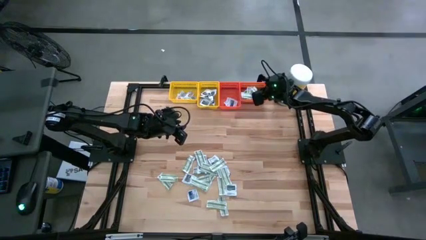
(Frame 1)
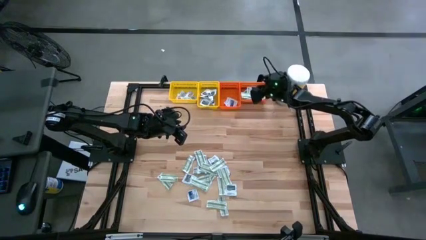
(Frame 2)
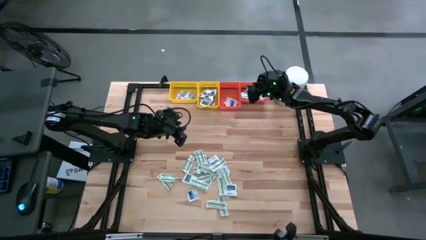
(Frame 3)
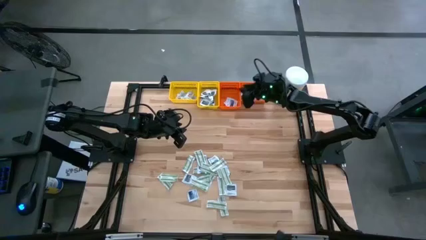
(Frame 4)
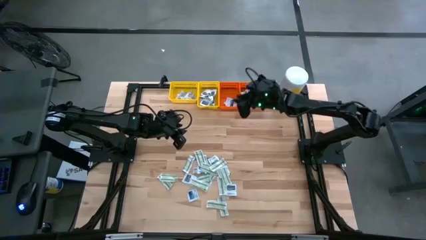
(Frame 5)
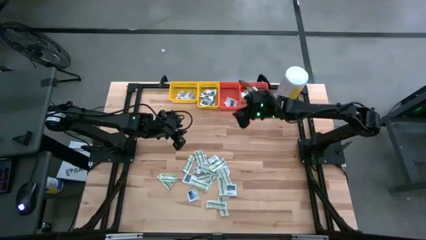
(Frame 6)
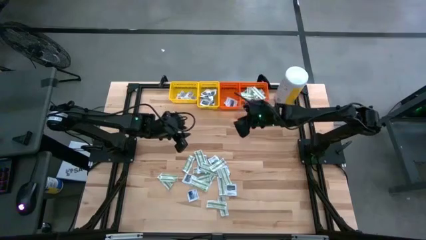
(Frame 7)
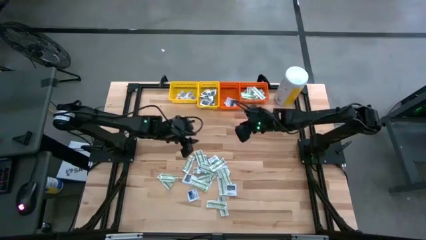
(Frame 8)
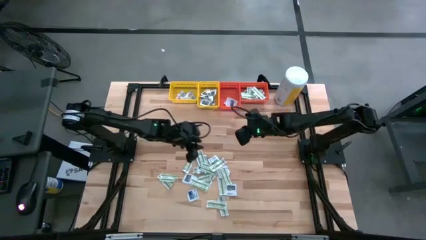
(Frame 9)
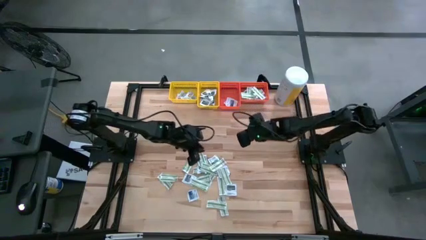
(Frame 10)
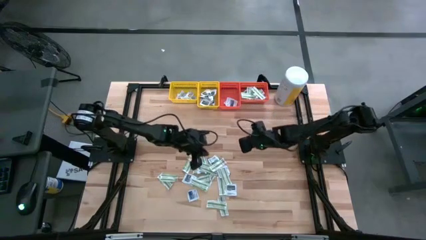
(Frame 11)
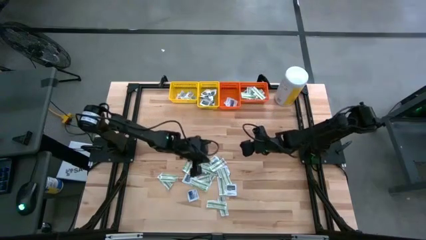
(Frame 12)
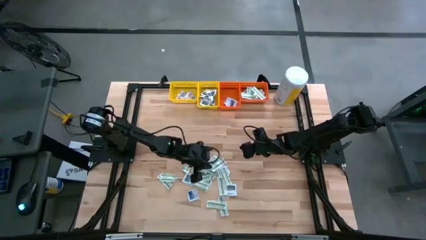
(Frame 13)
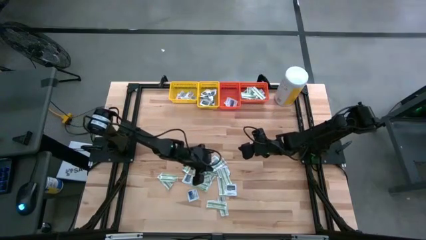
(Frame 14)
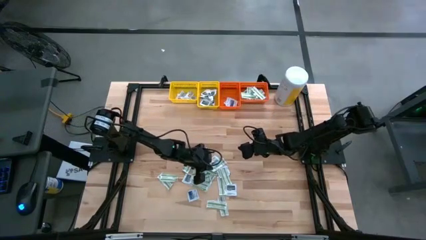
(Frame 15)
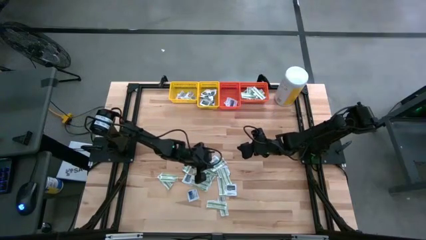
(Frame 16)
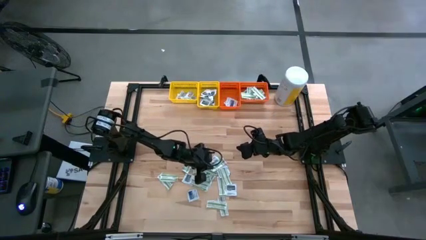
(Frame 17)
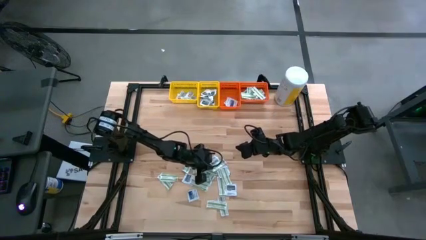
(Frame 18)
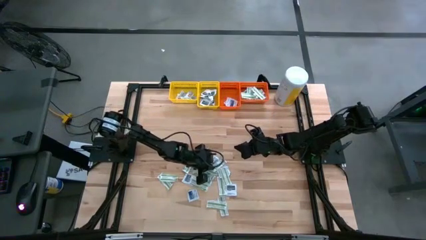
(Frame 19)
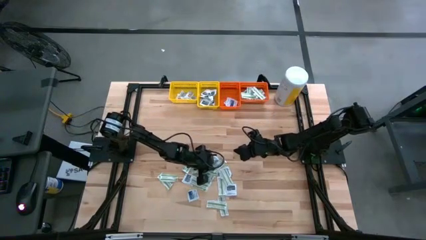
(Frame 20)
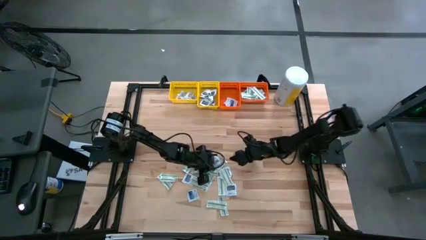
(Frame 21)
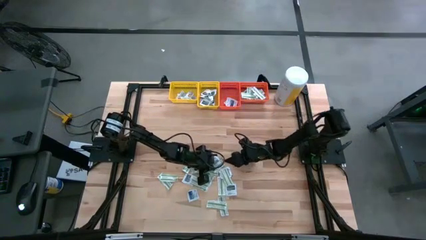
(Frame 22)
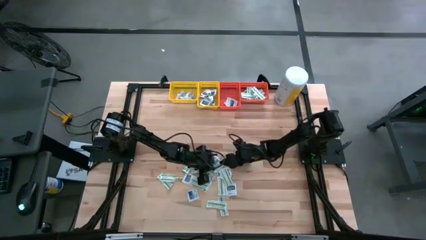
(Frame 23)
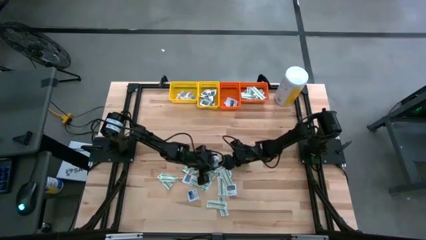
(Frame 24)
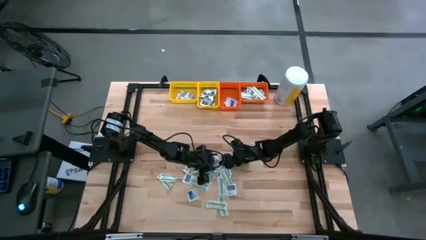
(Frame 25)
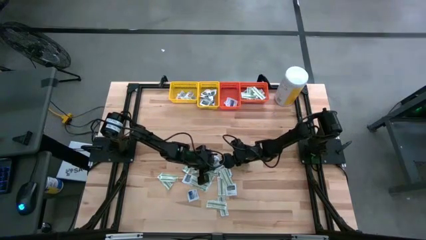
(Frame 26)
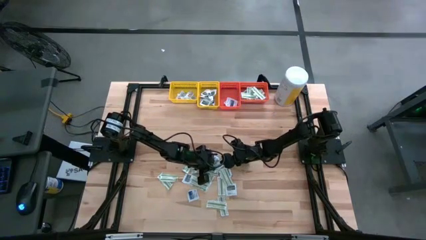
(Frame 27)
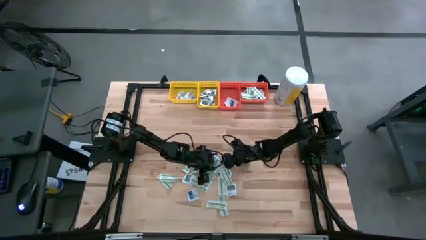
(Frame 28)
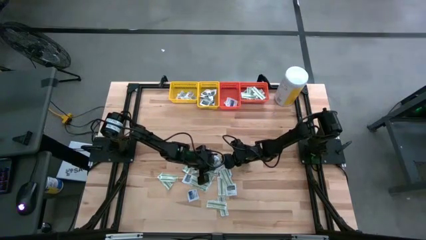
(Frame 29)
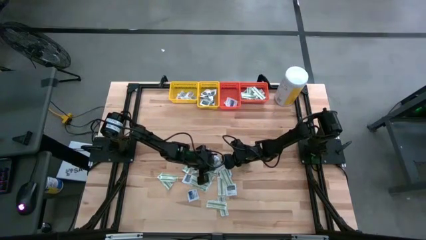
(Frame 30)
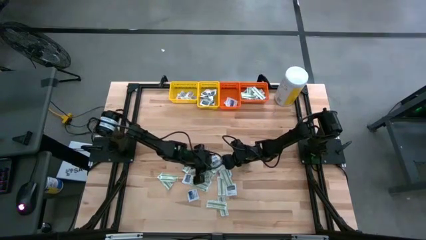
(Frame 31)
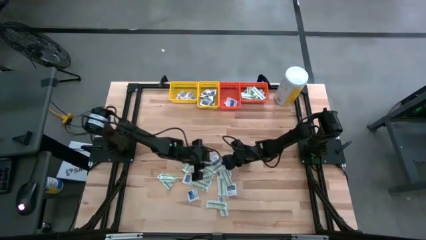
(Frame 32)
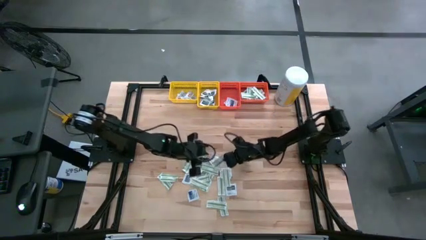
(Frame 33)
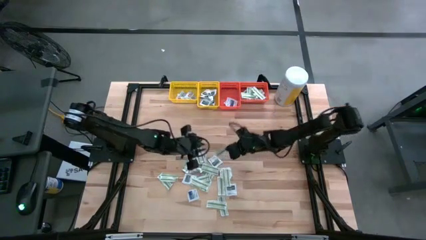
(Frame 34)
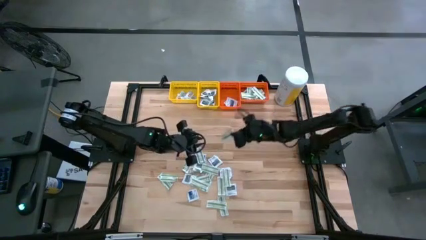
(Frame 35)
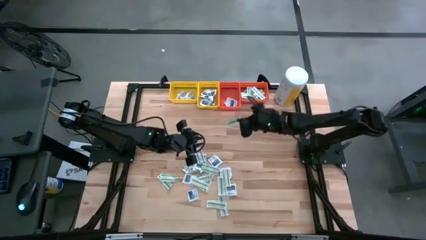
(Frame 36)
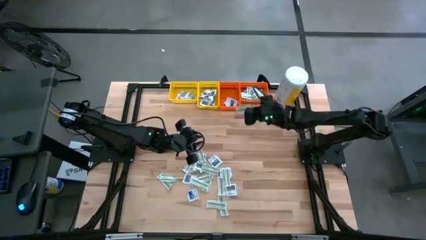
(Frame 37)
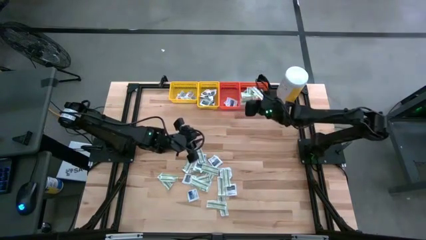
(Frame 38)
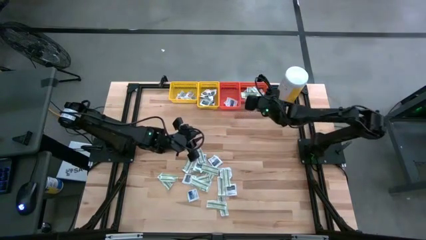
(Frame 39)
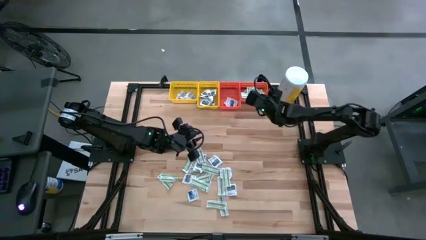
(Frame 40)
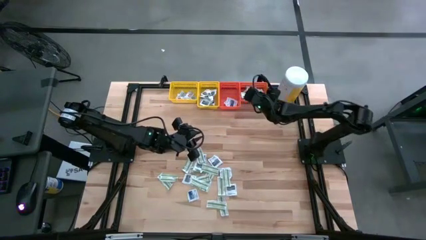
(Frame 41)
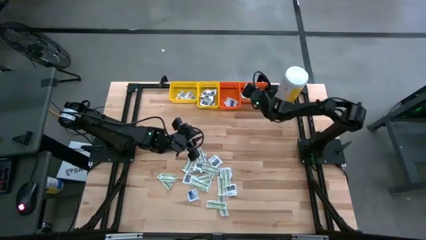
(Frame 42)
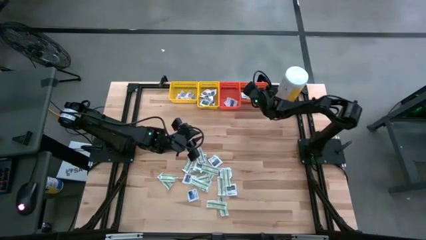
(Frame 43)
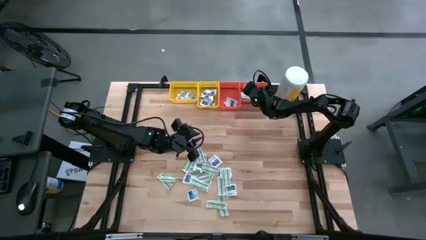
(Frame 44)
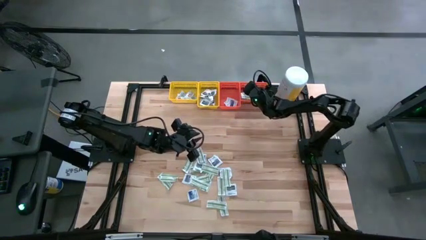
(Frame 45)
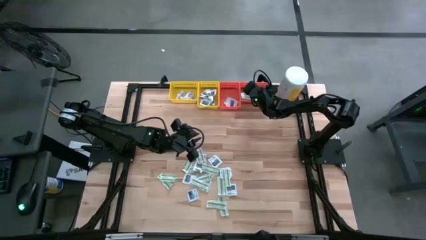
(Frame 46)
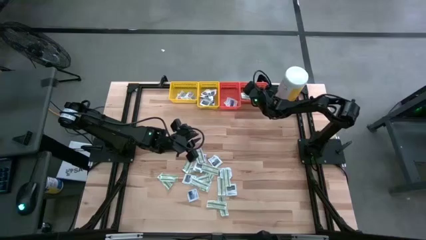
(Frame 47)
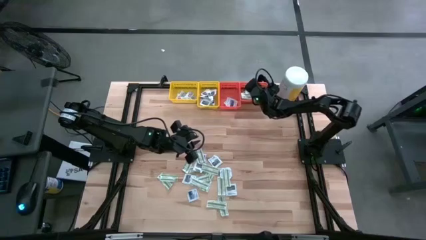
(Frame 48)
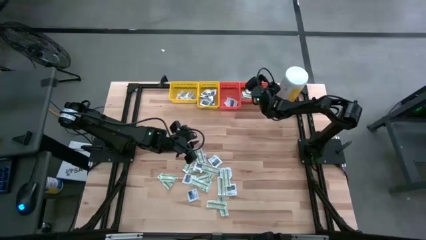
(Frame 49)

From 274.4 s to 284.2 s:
Task: Pick & Place First Aid Supplies
Put the green pad into the right orange bin

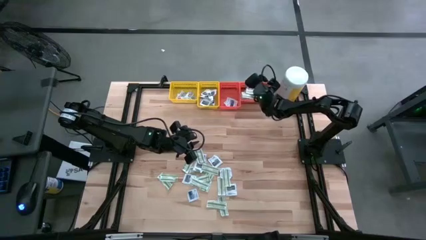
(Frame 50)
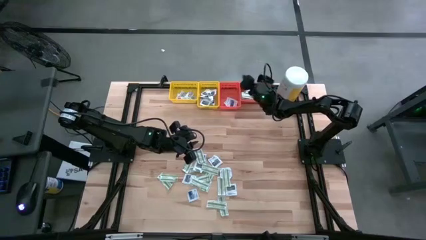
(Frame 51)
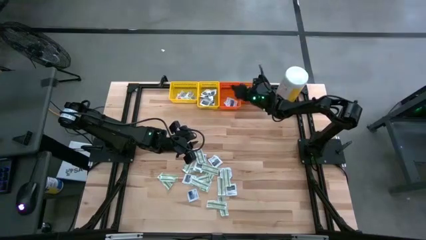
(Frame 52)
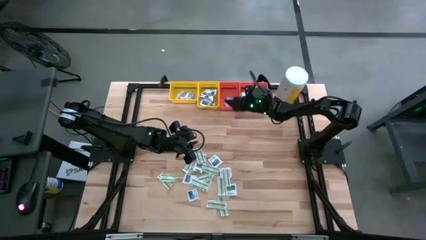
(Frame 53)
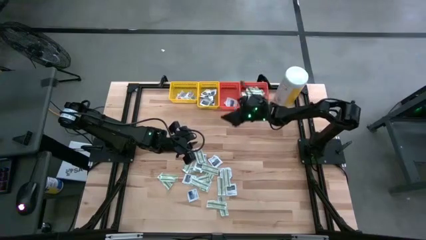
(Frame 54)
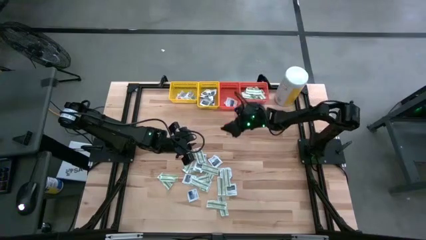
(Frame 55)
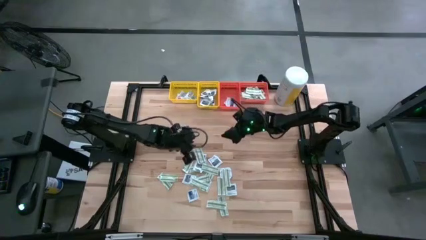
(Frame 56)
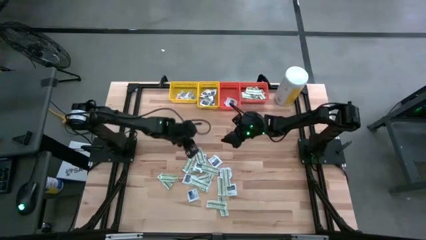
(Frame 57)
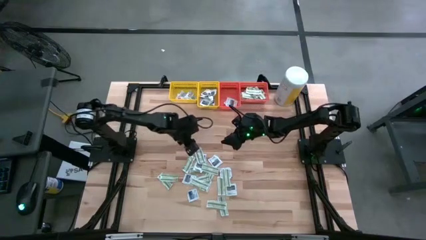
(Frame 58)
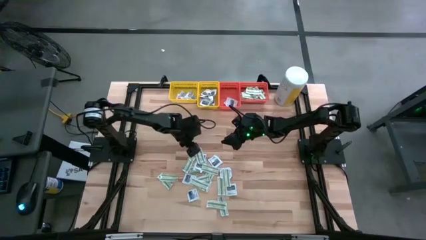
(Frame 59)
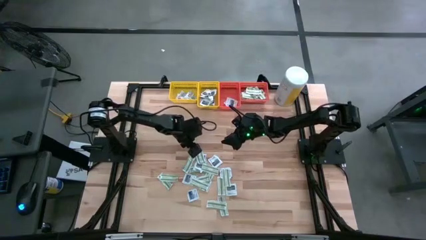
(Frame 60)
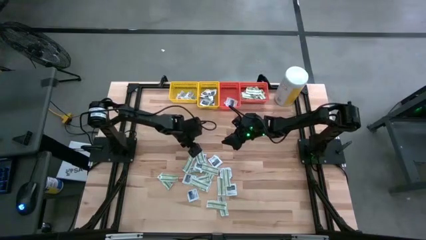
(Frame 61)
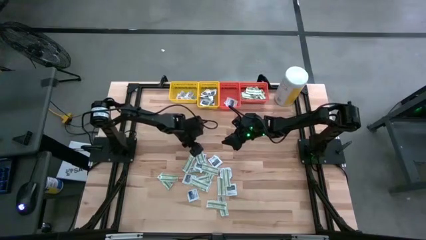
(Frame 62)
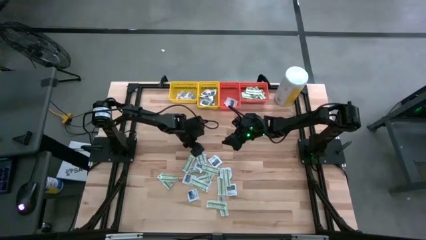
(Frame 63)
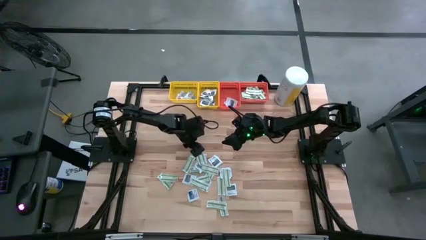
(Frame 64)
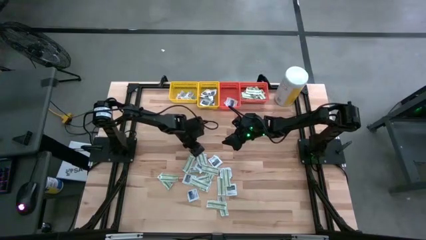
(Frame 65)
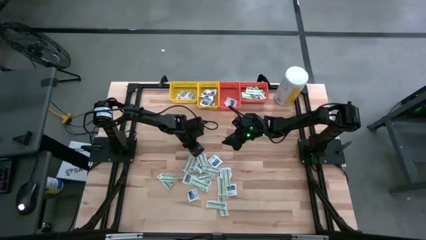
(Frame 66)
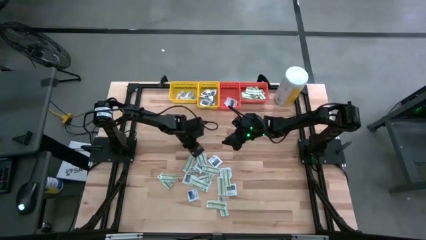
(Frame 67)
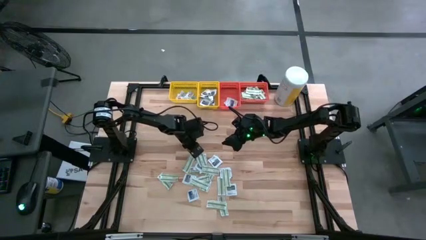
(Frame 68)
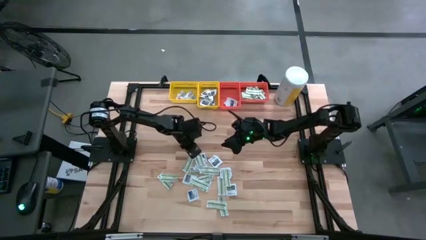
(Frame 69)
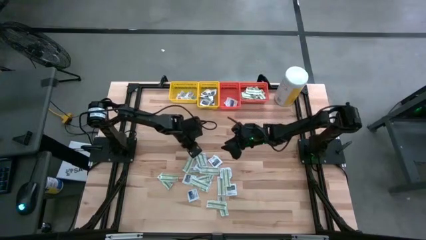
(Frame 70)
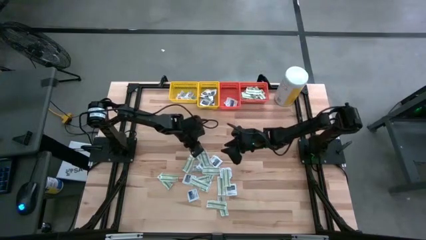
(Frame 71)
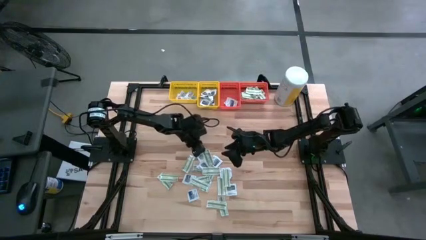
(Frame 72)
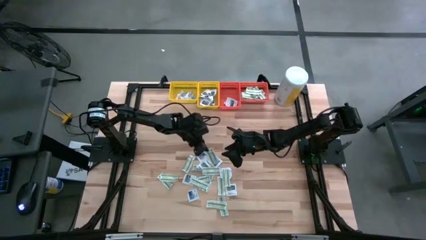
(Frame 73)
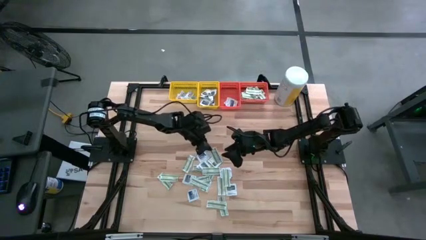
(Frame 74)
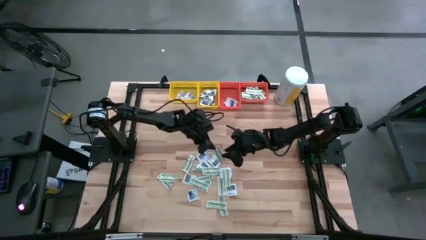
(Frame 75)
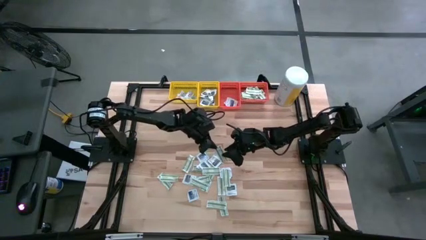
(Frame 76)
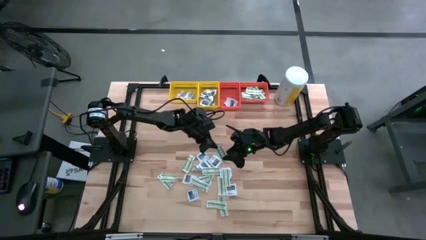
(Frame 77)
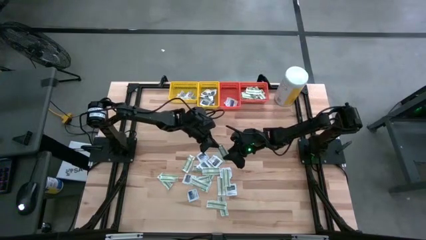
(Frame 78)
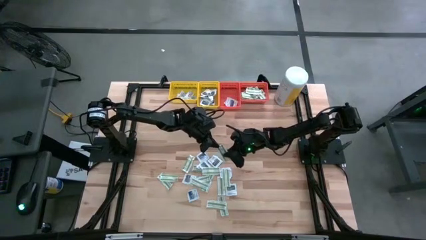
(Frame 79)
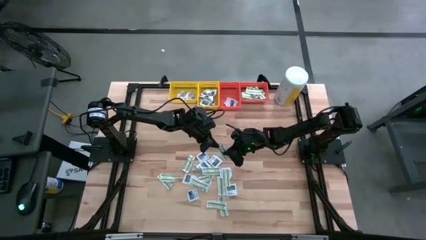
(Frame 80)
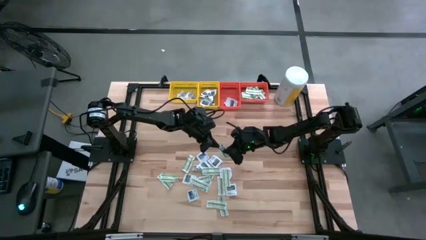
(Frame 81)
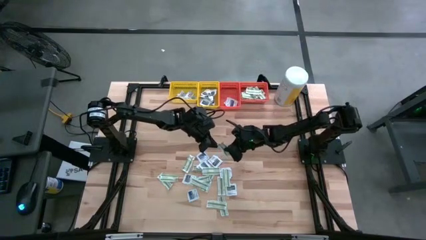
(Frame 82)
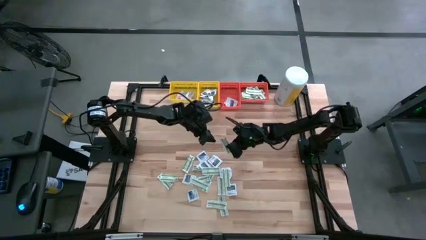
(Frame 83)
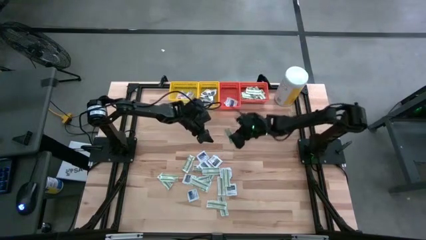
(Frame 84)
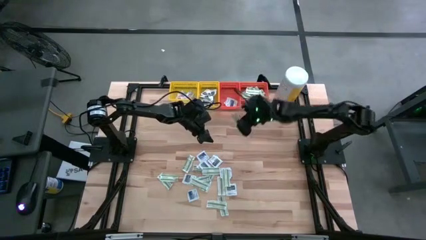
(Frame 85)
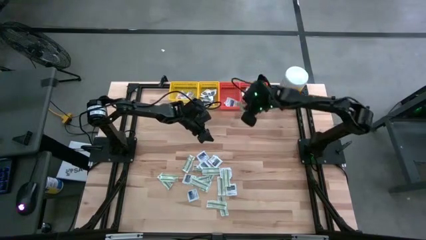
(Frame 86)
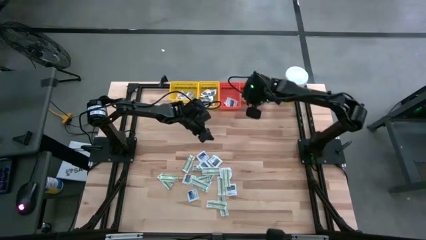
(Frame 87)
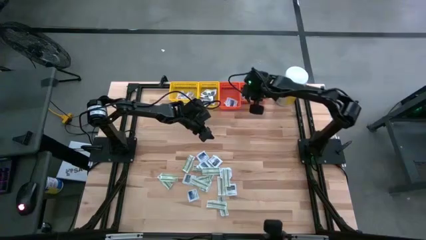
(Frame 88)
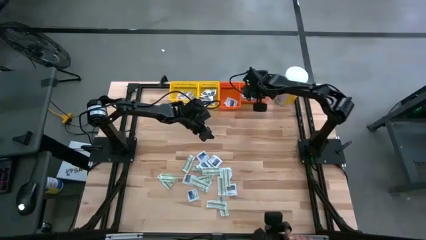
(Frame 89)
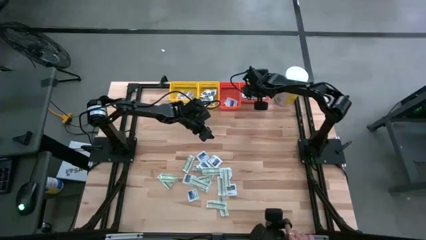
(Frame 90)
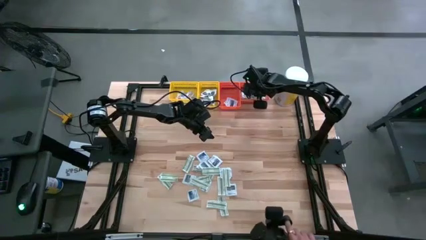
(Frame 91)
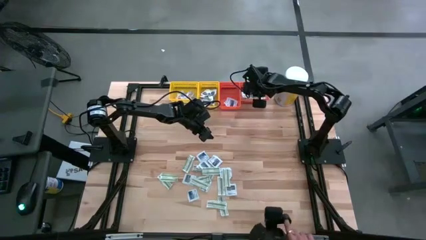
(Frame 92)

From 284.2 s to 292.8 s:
Put the green pad into the right orange bin
